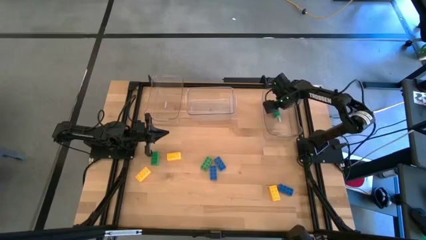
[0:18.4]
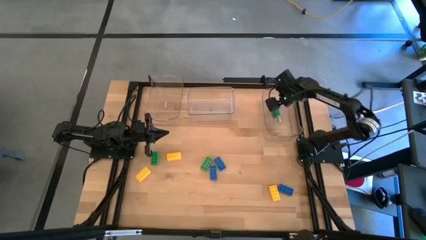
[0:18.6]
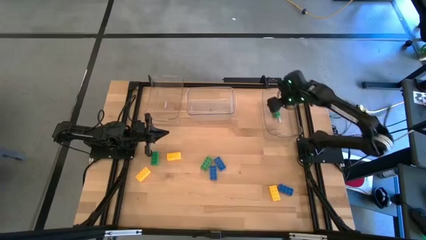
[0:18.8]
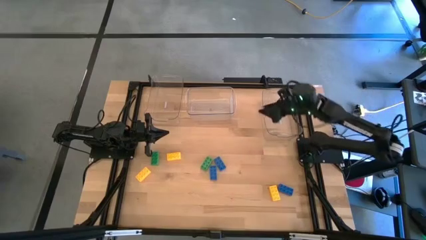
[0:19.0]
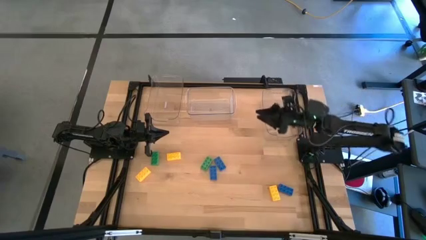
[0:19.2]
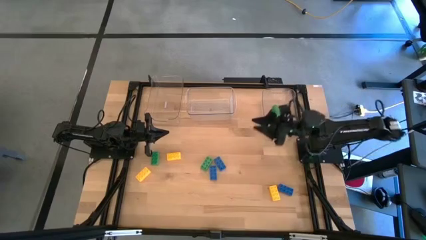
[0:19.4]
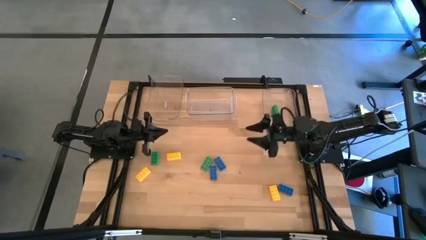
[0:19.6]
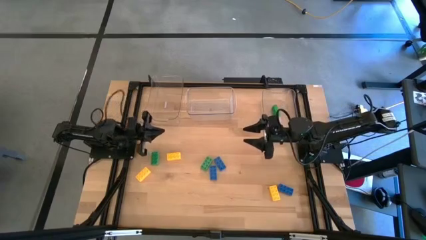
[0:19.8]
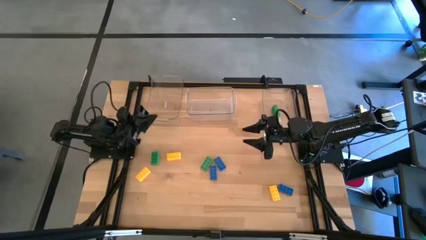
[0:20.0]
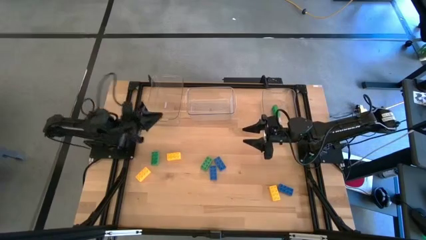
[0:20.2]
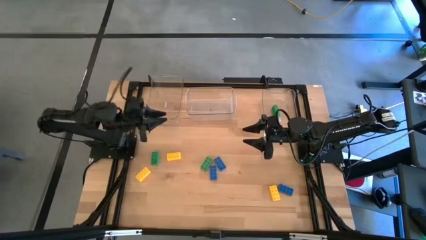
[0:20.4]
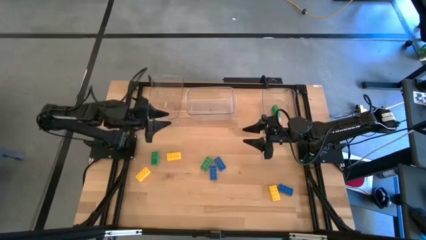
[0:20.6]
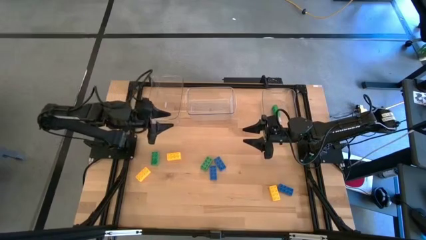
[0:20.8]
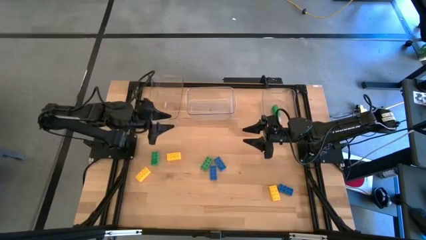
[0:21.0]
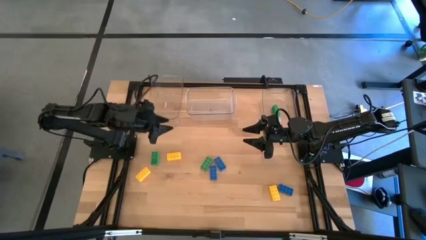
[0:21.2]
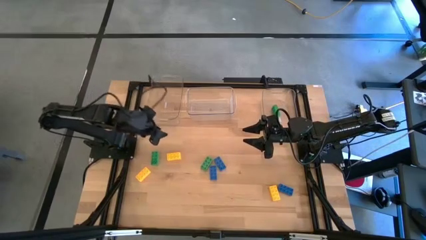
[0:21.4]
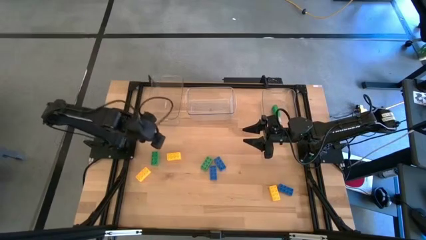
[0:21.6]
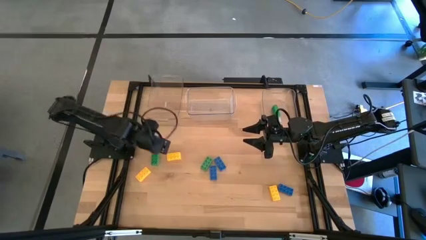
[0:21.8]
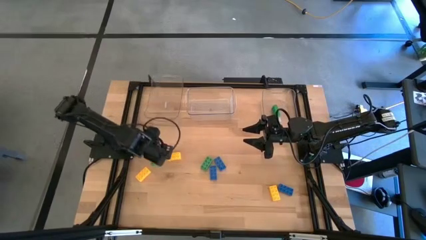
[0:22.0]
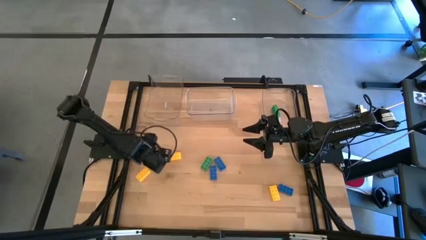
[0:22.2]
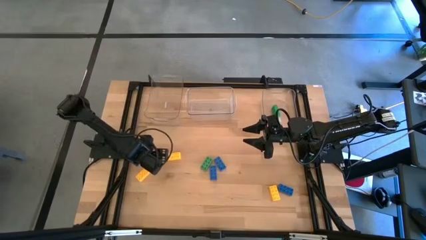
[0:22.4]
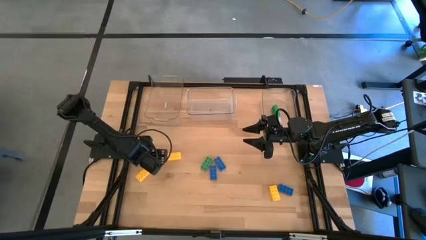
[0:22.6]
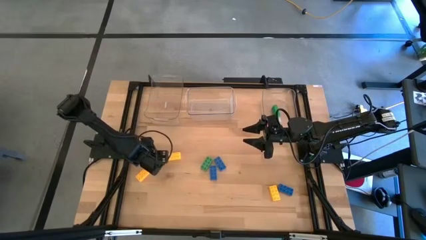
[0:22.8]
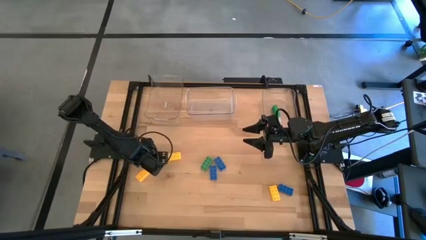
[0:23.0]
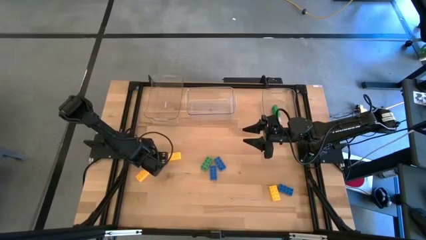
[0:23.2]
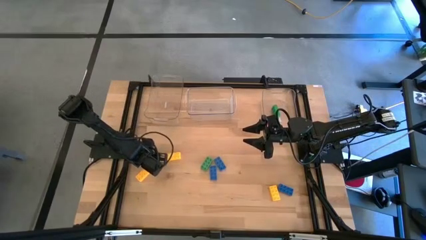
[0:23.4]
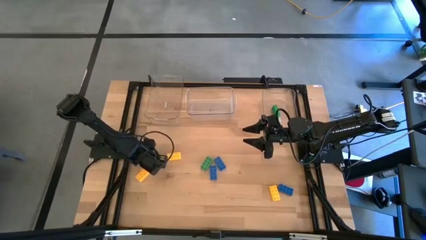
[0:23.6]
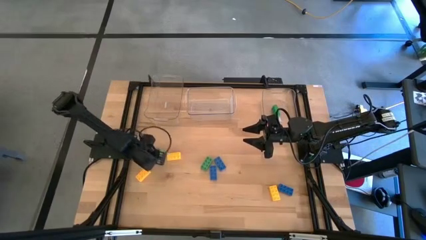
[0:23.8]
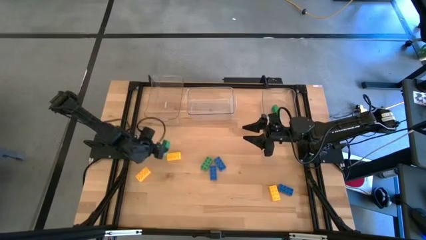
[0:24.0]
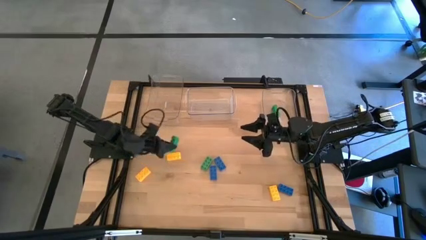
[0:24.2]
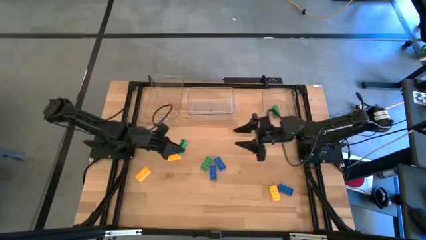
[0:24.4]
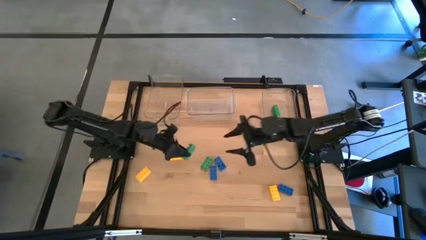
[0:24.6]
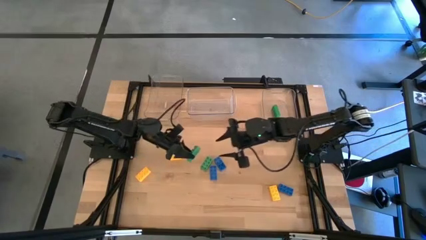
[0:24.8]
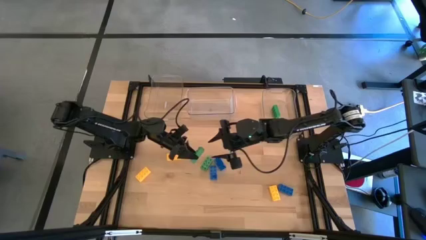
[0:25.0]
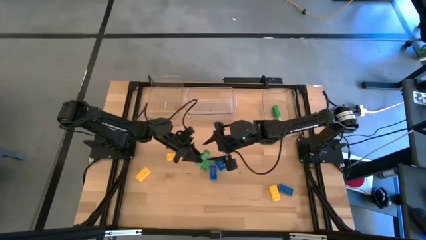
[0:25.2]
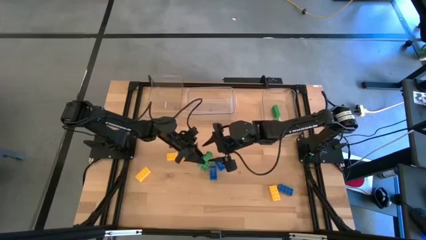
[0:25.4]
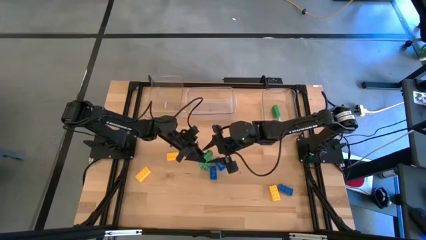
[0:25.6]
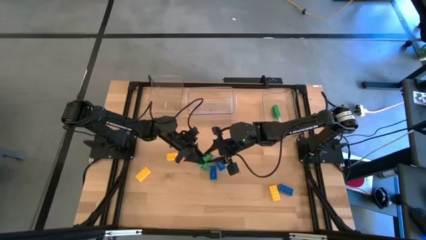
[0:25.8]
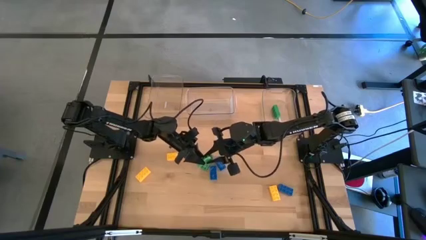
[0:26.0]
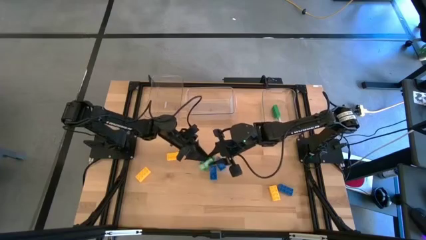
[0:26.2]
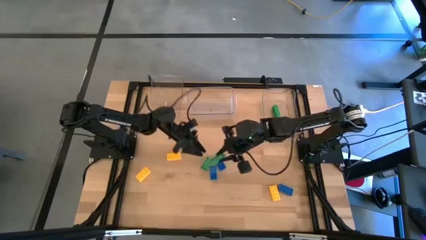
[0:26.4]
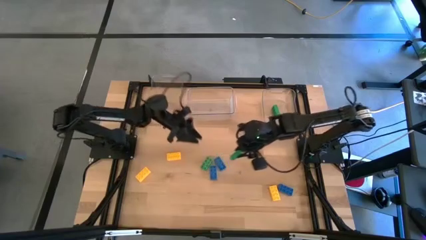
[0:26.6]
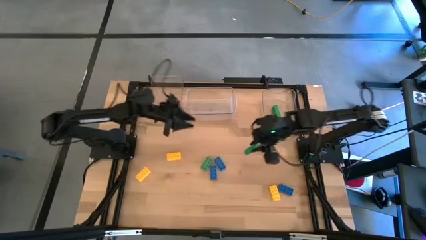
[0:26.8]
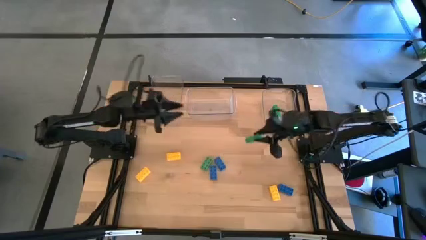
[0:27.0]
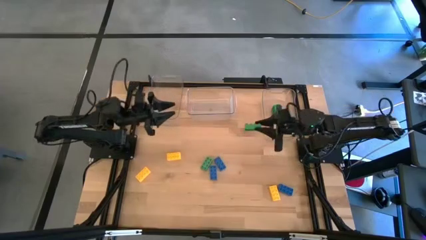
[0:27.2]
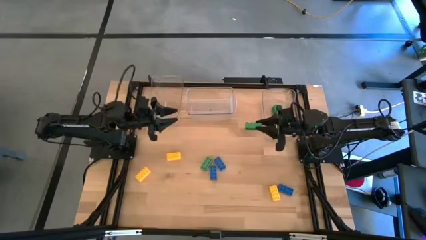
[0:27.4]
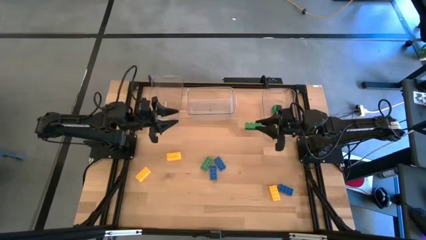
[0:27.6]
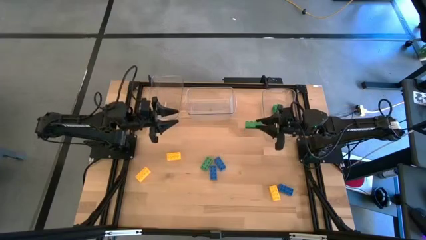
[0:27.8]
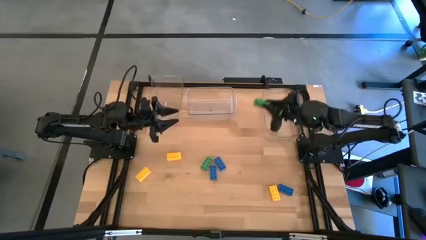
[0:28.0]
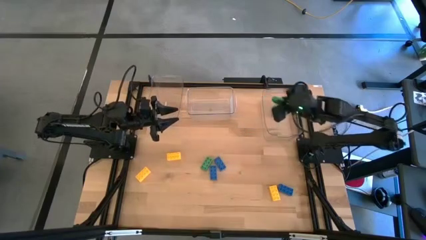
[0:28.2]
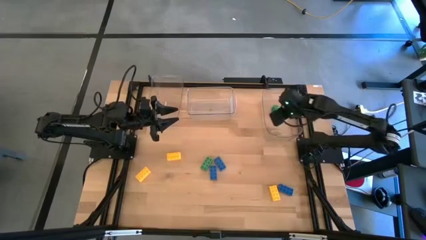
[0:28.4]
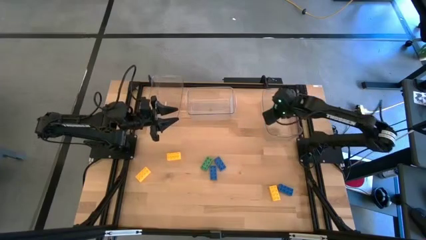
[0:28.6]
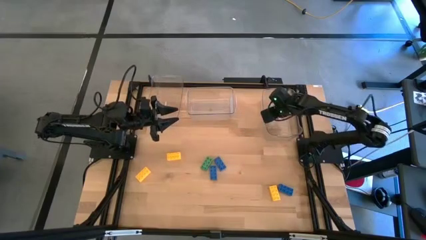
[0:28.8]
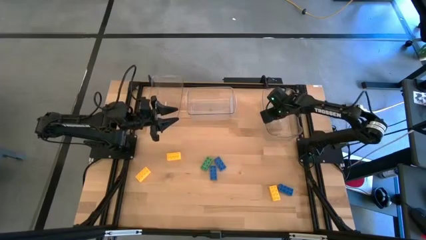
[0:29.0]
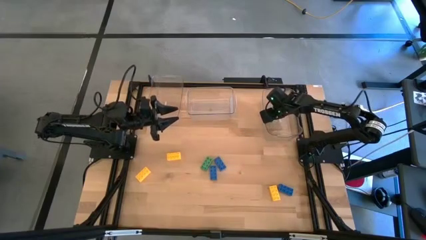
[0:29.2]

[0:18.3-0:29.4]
Task: Sort & place blocks by color
Put the left green game piece into the right transparent bin

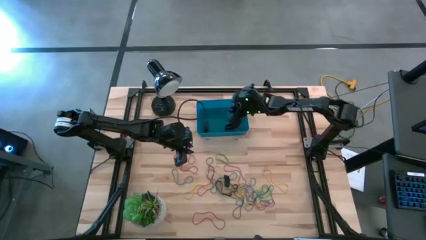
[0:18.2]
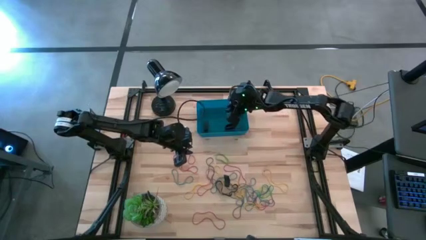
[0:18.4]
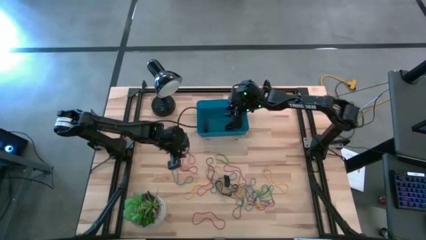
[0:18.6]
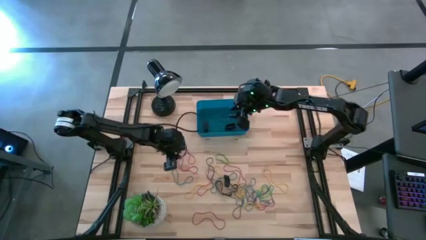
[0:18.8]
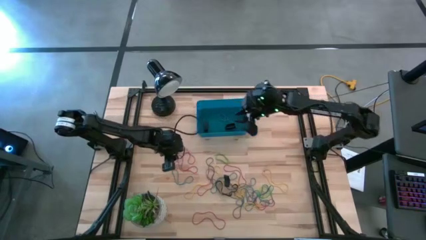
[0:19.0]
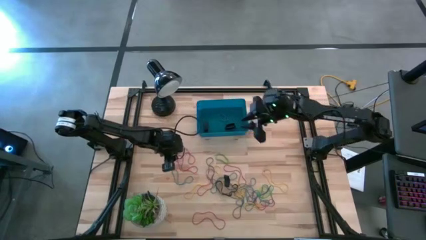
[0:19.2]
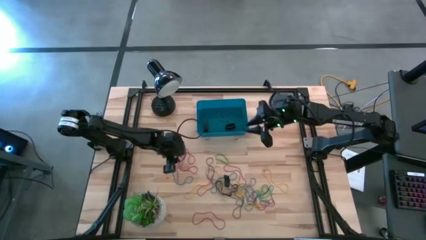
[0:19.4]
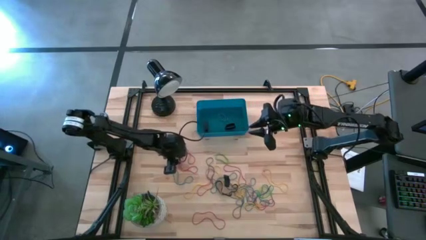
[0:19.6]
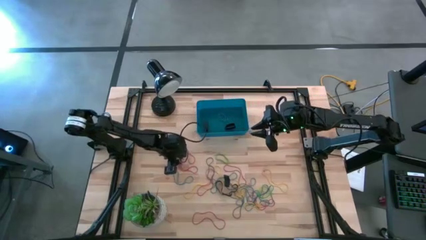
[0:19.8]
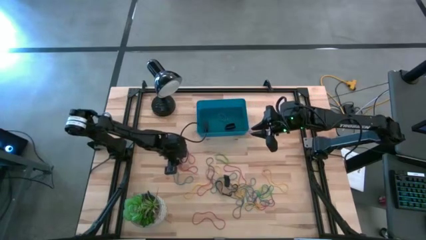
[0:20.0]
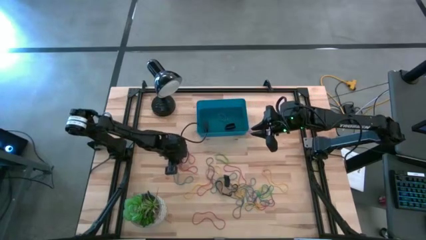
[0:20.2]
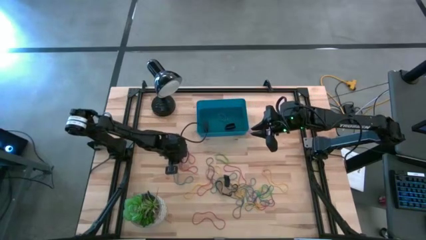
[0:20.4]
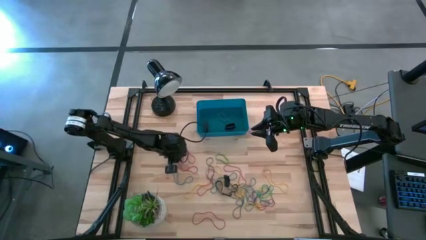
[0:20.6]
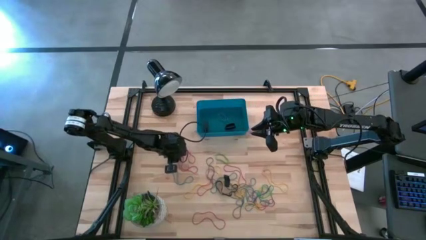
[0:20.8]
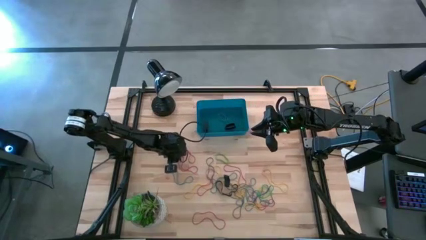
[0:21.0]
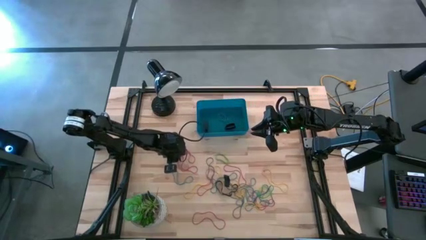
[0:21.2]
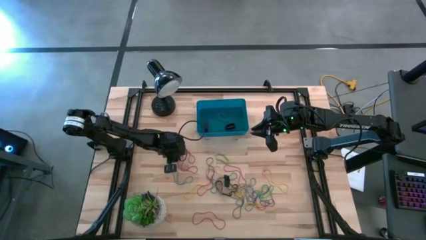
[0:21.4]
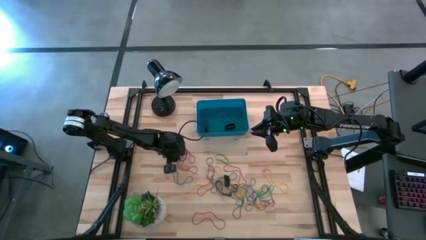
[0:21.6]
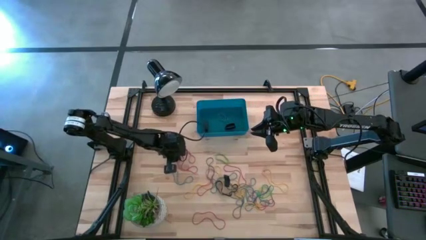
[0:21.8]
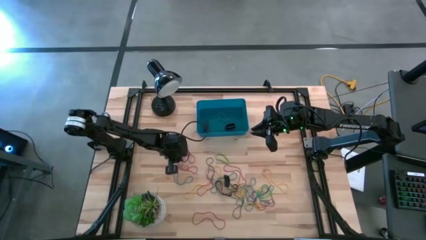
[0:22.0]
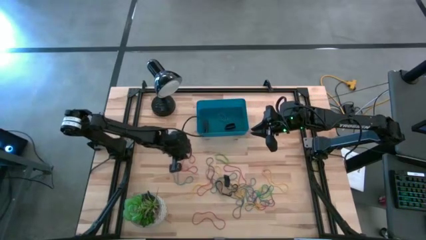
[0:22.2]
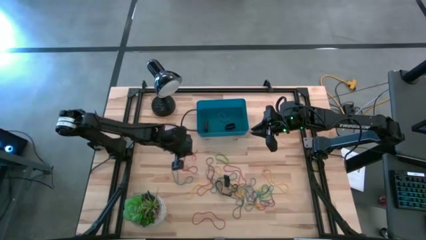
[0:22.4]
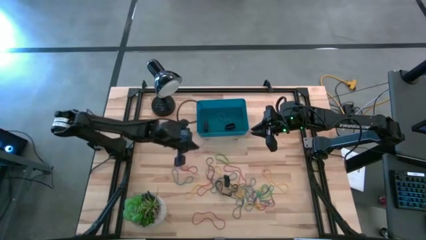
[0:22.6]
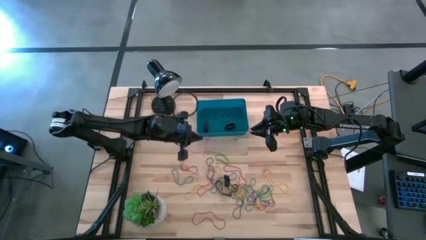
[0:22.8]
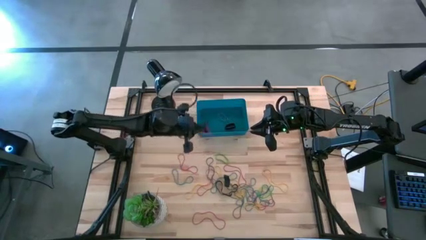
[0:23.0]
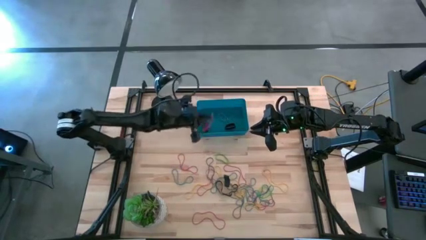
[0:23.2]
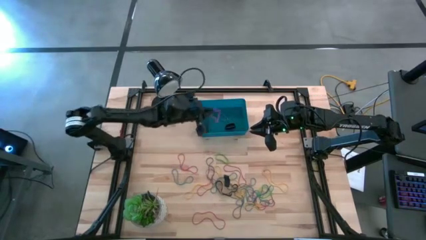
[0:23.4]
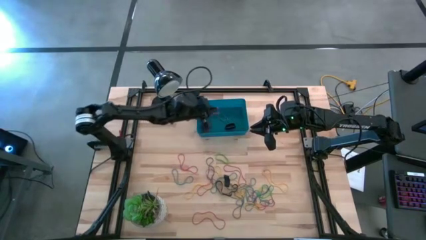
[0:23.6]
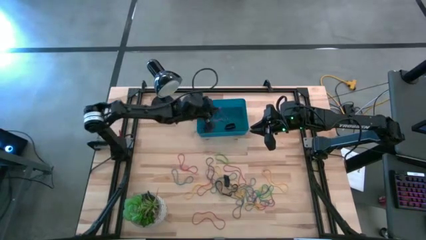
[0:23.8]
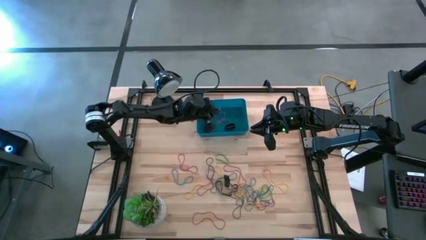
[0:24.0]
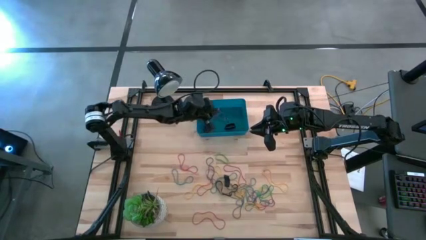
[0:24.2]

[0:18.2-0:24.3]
Task: Pick and place rubber bands into bin
Put the red rubber band into the blue bin
